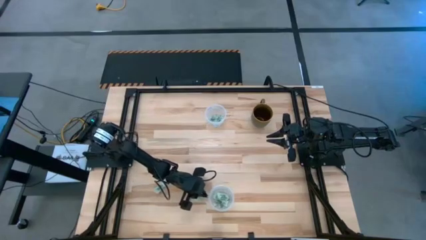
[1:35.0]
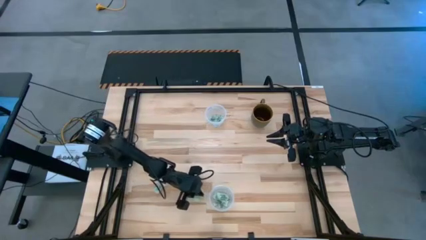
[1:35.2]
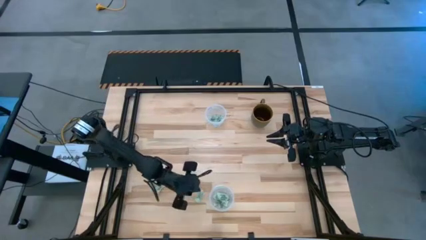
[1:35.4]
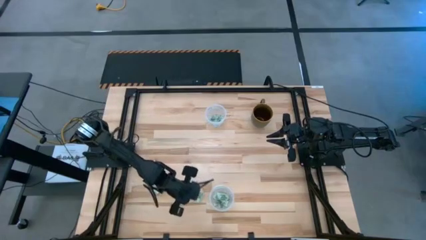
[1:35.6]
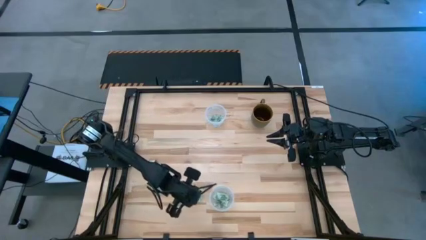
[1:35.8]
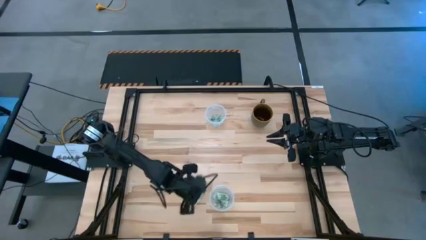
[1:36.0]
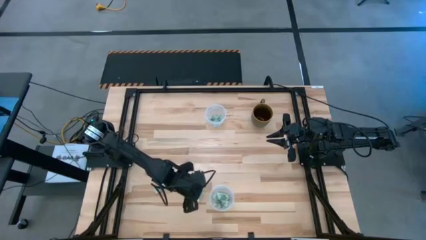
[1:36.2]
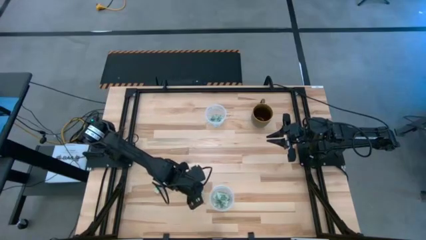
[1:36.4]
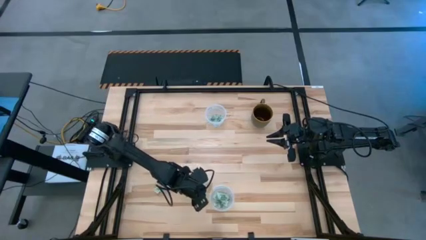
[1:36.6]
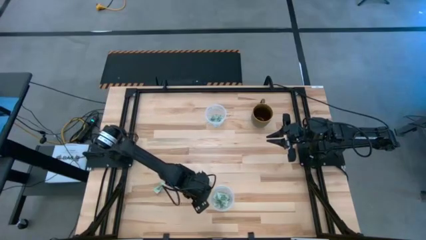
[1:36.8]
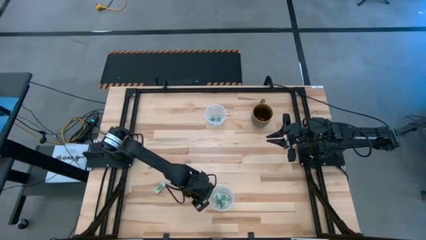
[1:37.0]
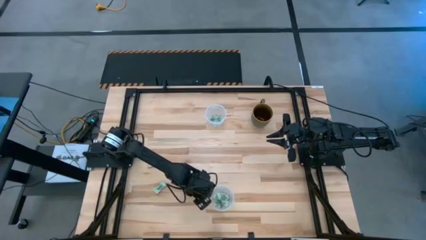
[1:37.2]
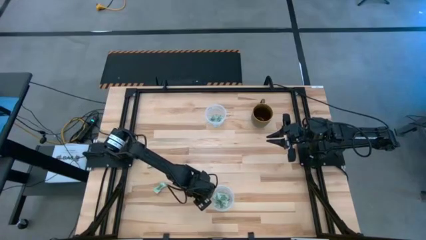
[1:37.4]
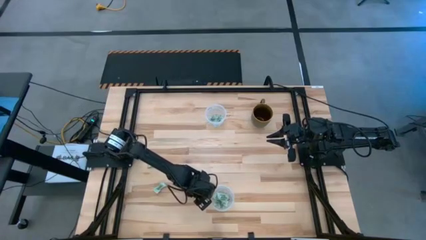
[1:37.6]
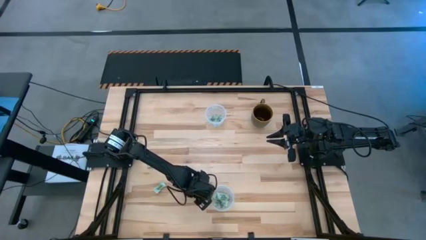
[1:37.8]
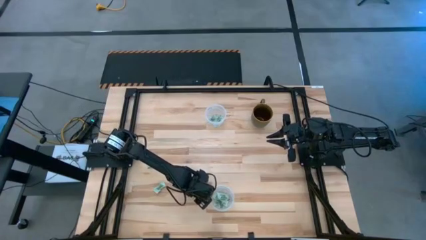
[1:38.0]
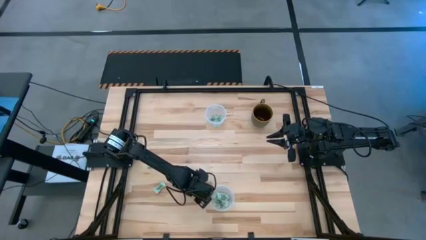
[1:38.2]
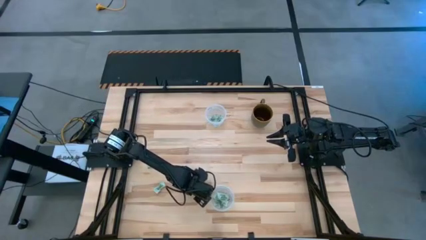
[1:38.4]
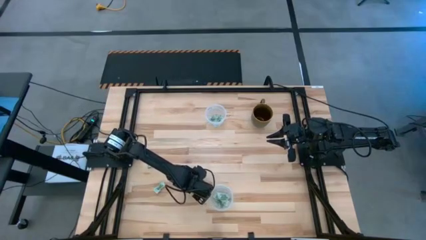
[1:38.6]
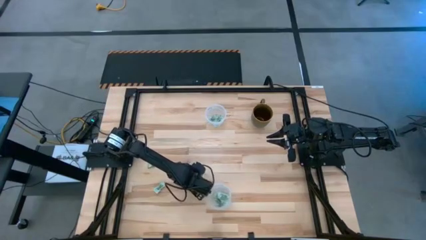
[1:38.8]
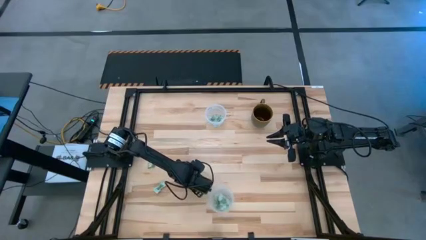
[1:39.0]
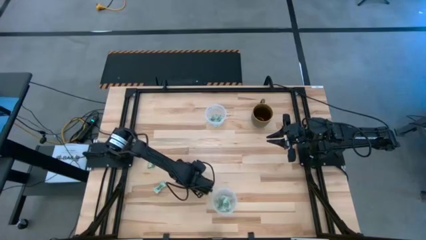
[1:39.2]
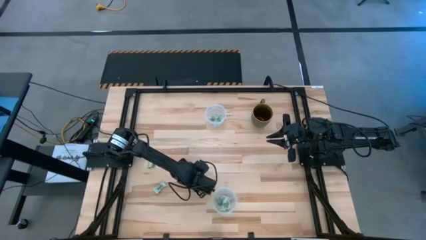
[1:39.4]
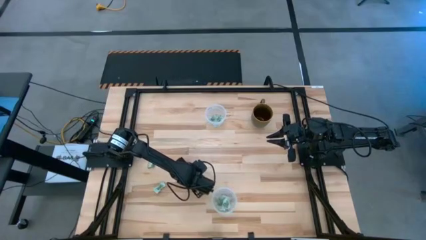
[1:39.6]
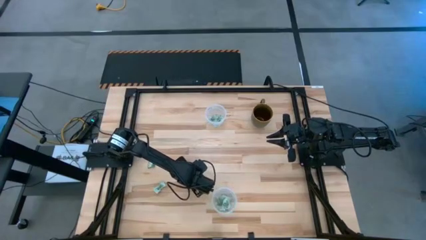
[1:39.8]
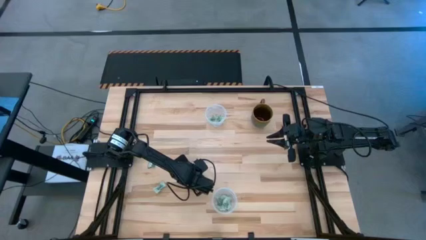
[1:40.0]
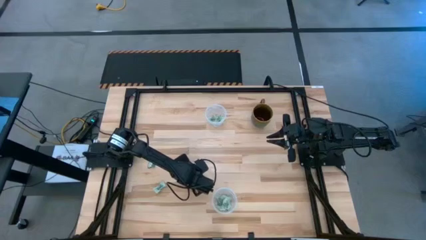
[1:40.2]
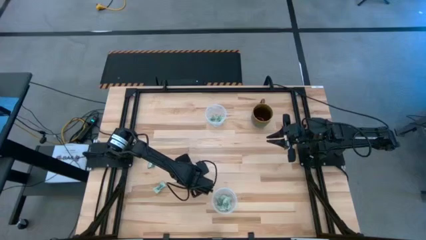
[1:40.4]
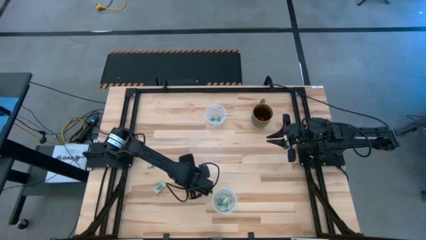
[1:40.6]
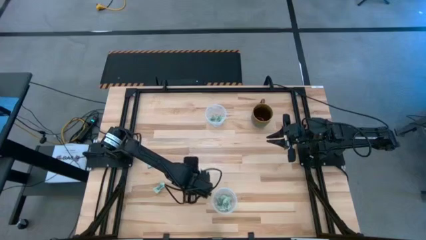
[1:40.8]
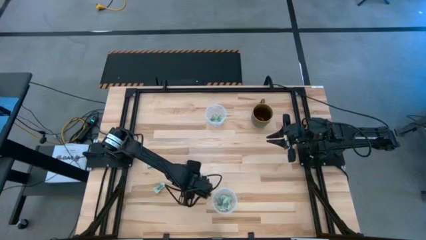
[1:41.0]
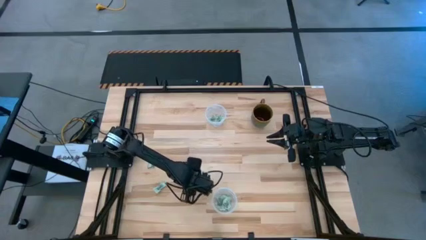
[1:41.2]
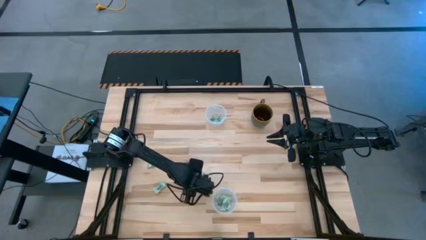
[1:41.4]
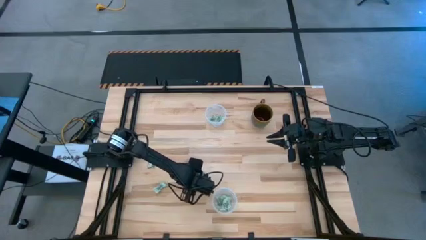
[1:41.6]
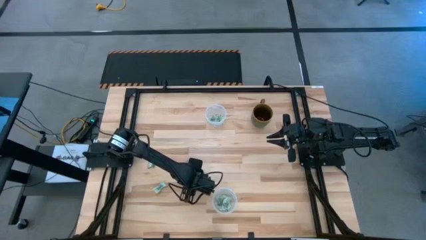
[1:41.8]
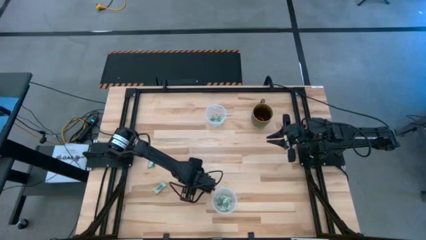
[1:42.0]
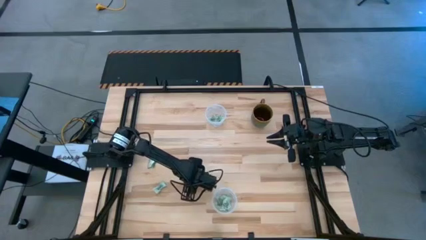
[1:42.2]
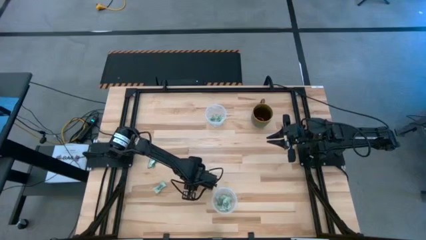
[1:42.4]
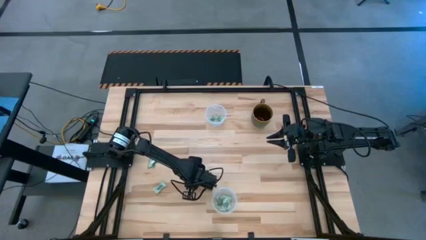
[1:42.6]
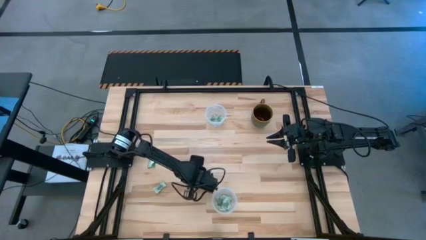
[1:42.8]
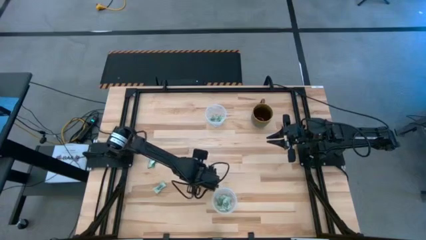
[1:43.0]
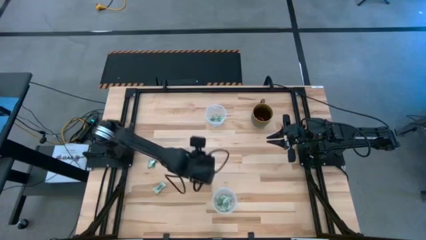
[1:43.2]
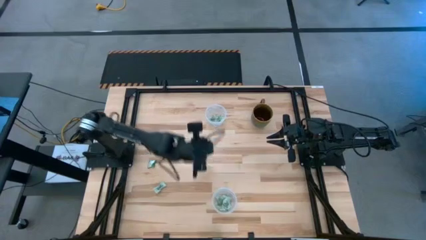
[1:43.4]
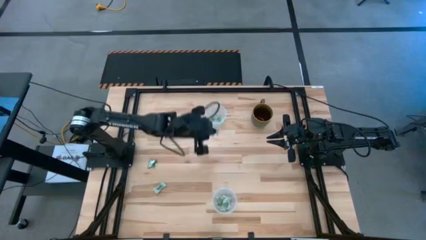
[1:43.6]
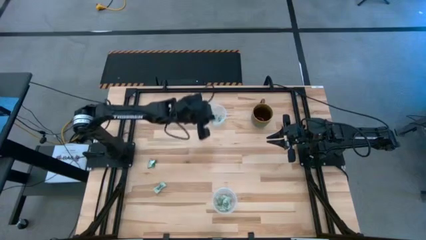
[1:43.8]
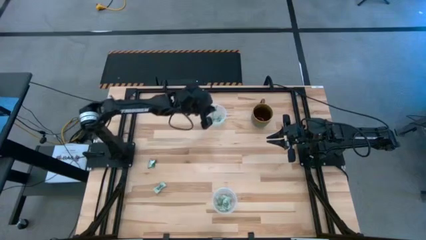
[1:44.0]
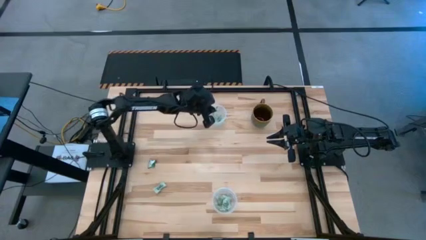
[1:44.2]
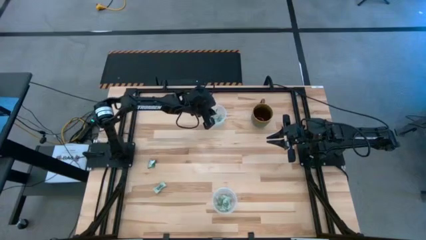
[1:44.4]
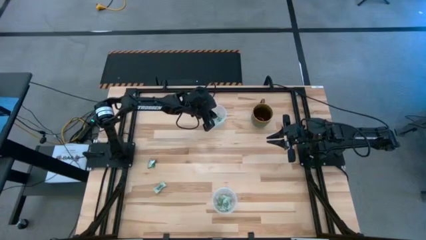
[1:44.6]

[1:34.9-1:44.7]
Task: Pick and place Stevia / Truvia into bins
Put the stevia packet into the top transparent container

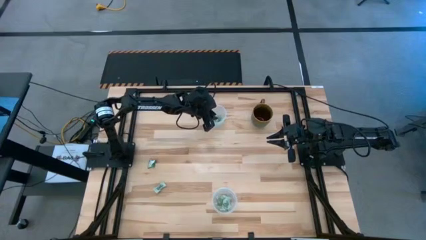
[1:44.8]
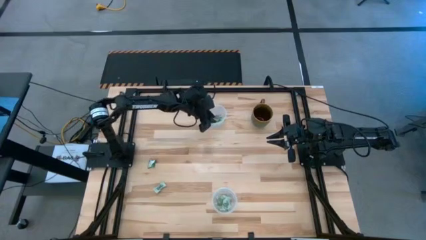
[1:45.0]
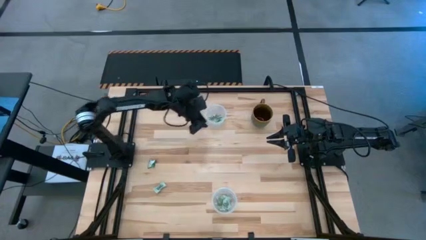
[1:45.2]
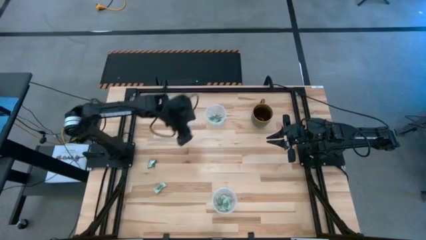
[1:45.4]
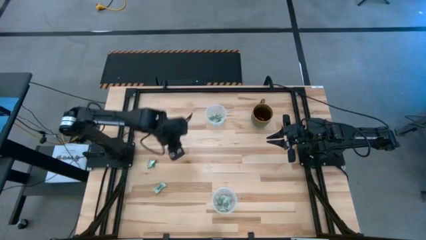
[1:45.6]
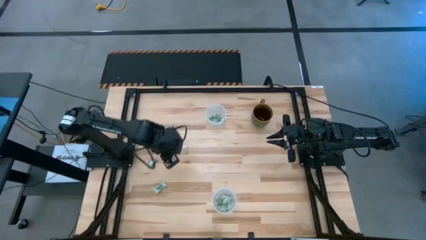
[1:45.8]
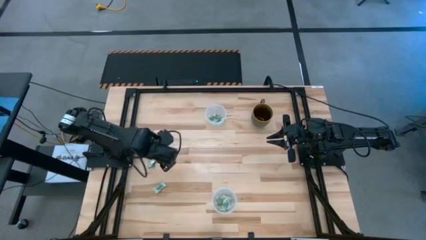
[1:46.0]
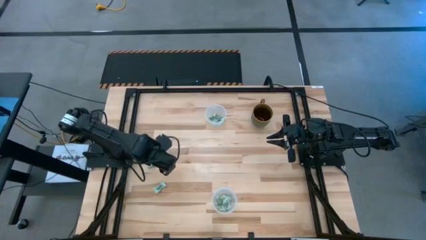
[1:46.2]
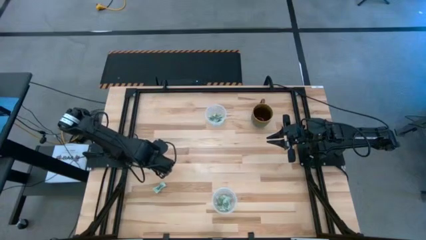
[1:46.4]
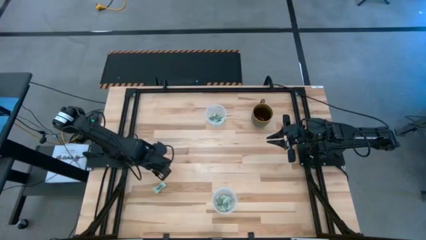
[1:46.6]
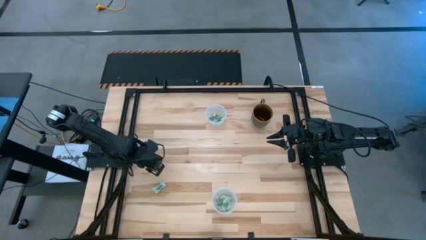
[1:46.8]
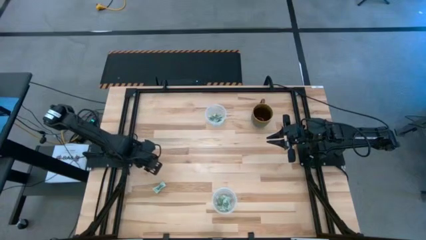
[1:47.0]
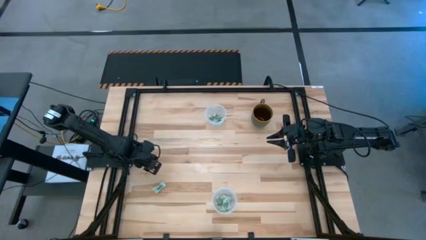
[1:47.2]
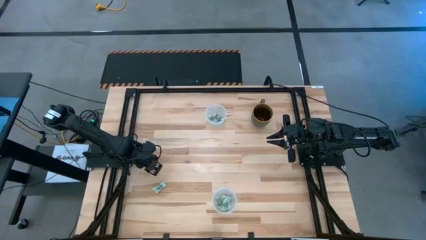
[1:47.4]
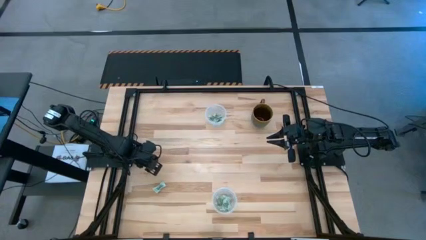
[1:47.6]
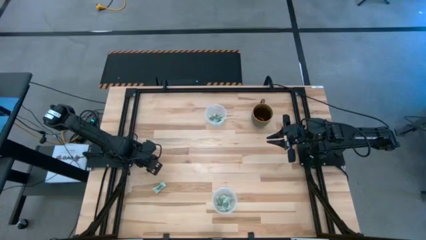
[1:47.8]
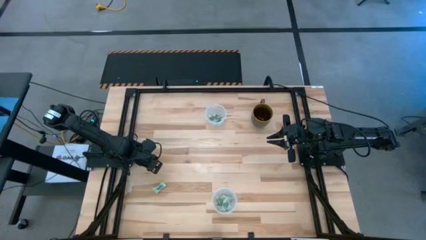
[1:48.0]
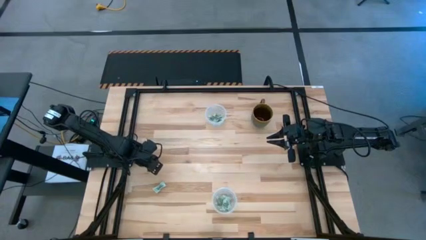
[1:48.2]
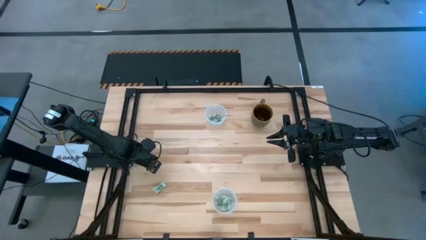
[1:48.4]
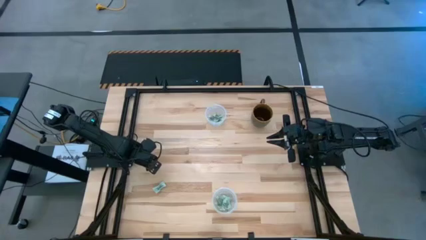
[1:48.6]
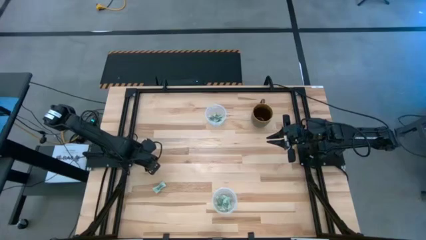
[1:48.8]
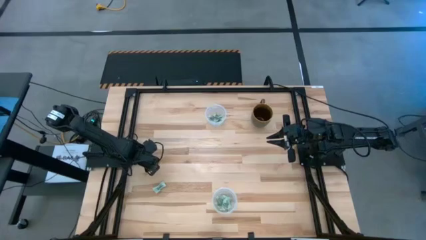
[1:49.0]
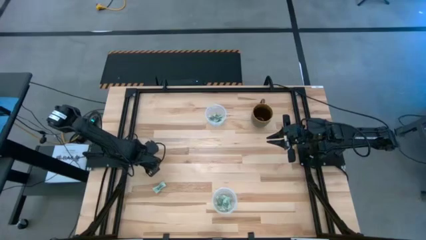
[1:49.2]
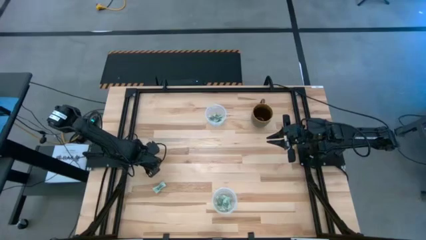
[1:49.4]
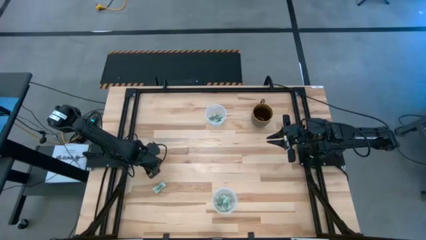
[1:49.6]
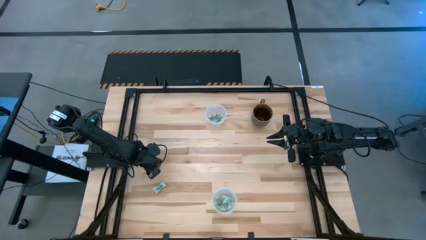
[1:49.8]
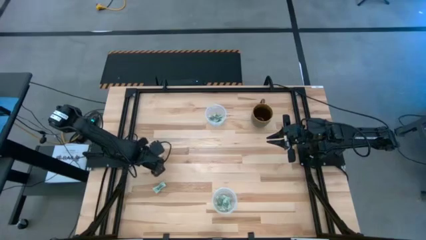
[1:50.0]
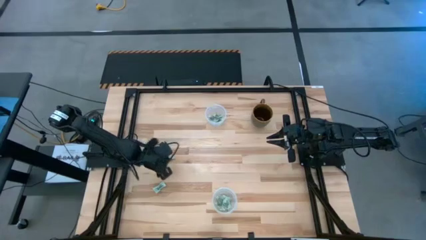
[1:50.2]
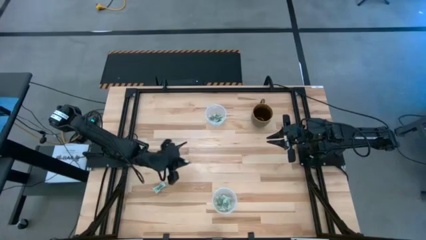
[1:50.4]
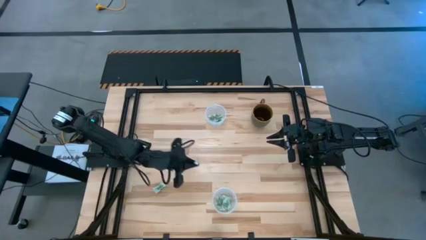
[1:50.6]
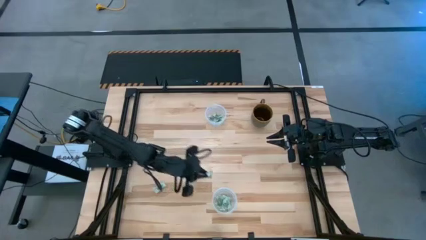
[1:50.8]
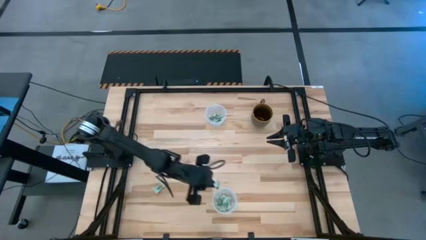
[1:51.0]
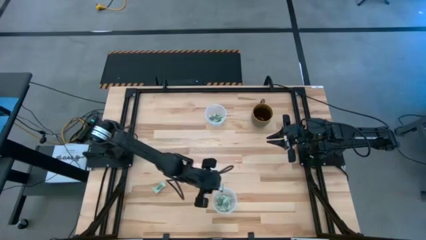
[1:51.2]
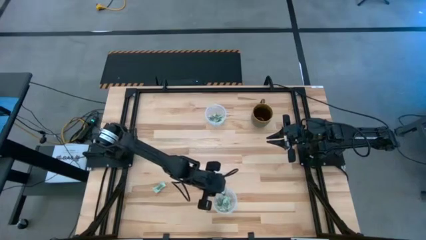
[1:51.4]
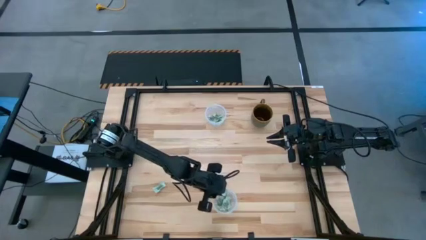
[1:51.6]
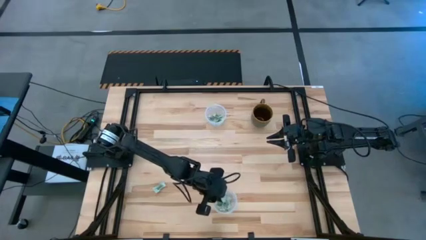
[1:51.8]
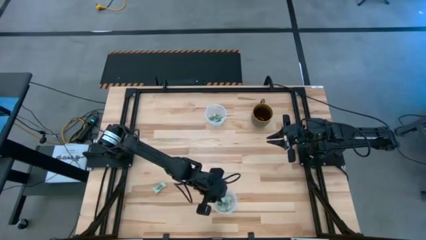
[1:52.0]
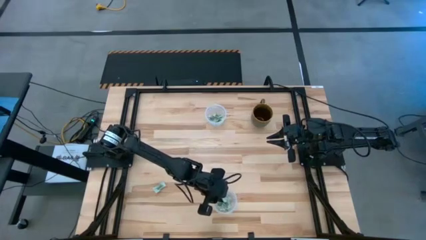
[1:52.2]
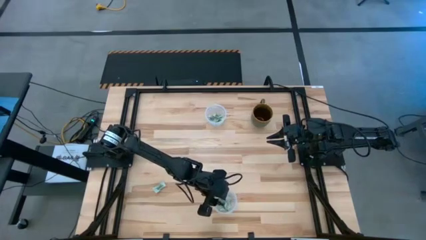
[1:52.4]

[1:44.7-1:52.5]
Put the truvia packet into the bottom transparent container
